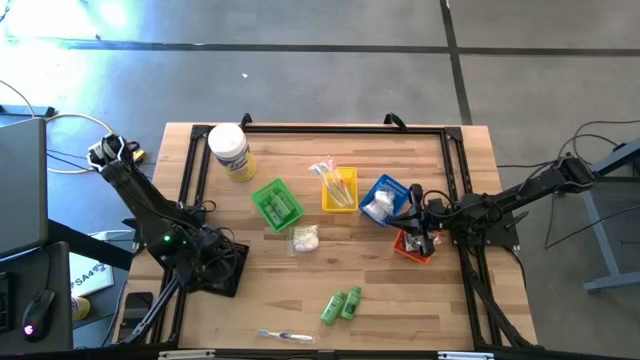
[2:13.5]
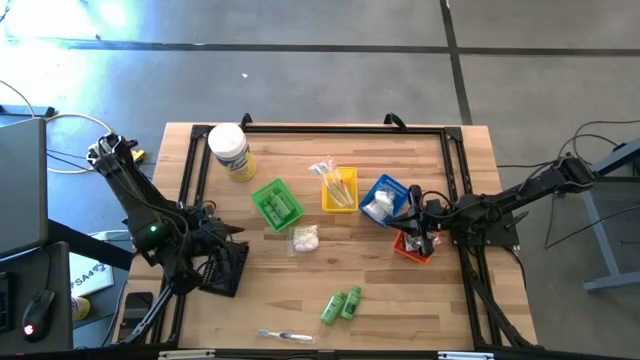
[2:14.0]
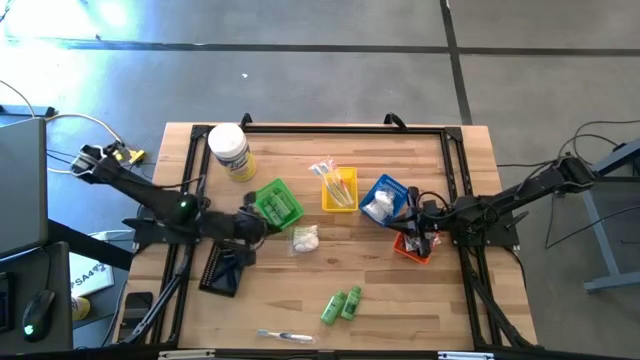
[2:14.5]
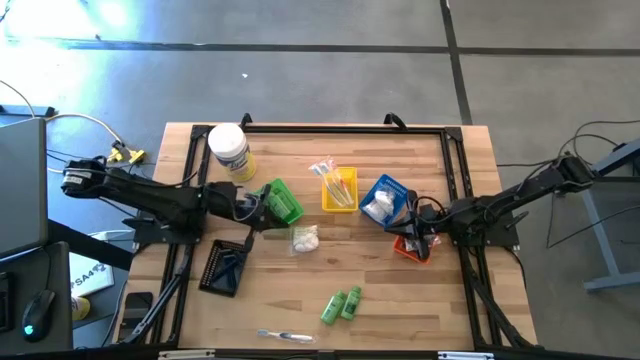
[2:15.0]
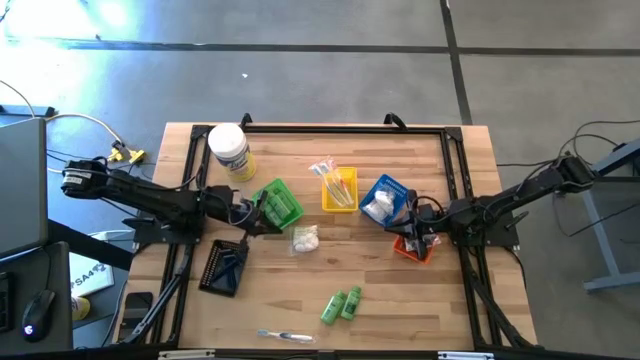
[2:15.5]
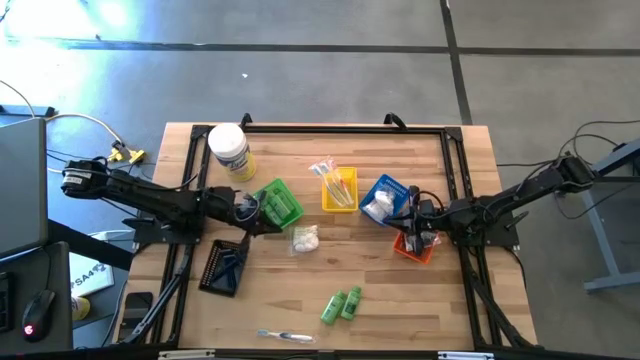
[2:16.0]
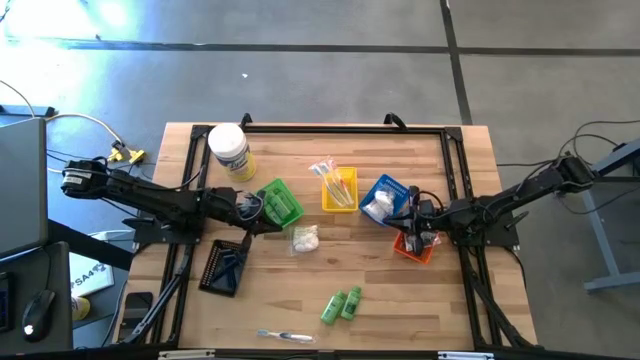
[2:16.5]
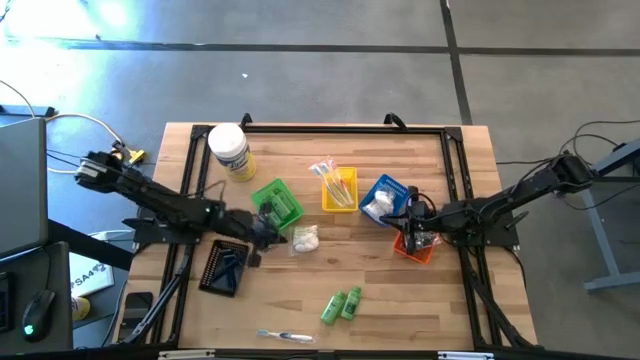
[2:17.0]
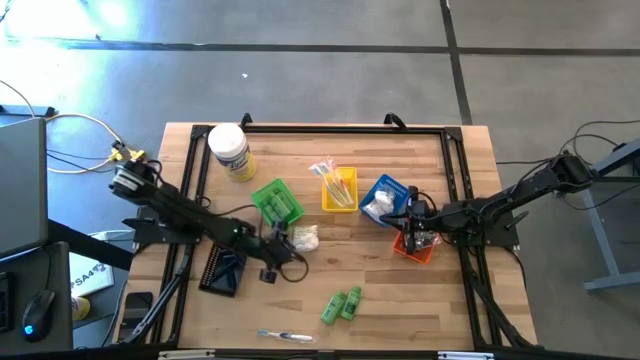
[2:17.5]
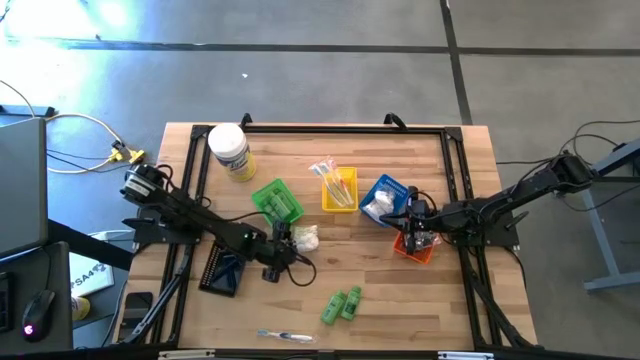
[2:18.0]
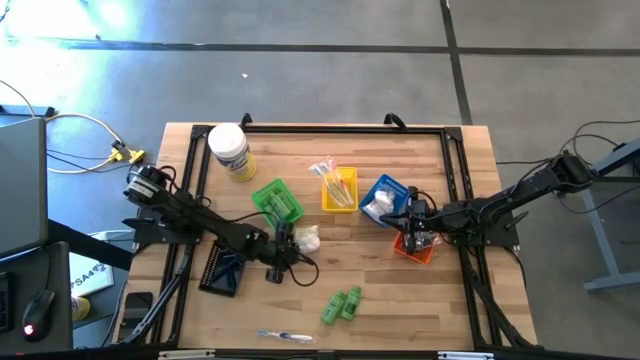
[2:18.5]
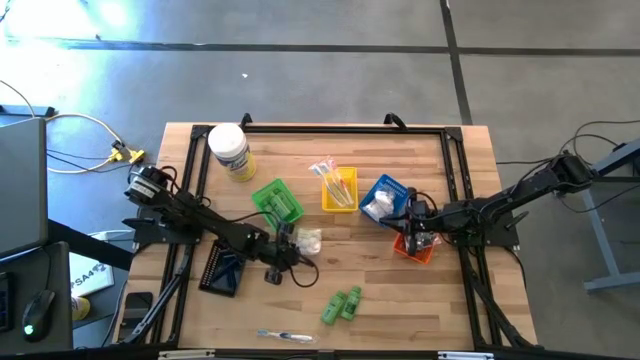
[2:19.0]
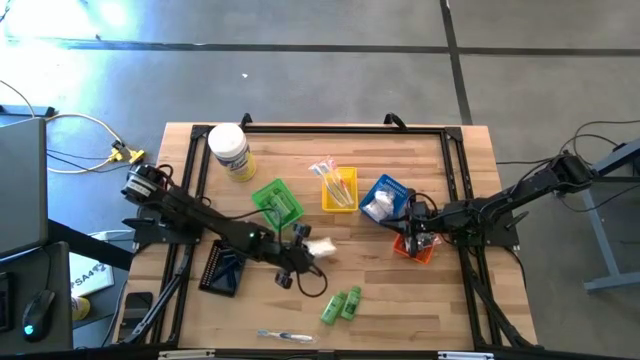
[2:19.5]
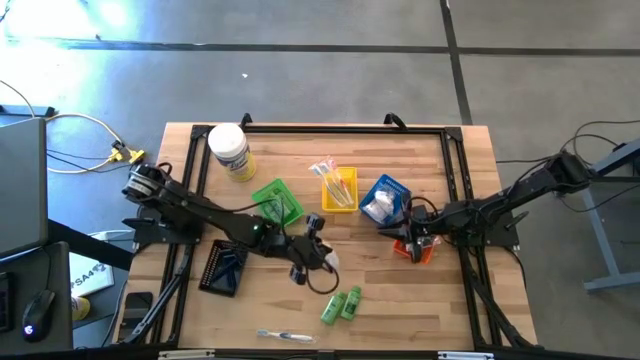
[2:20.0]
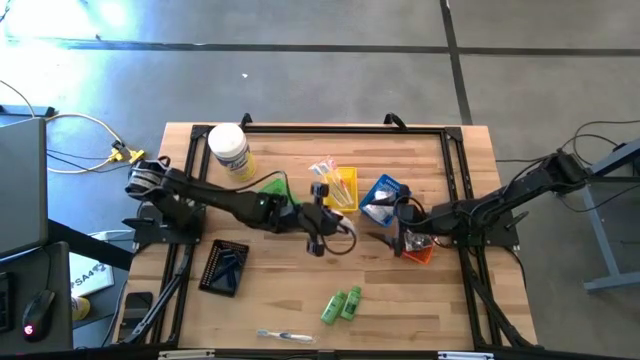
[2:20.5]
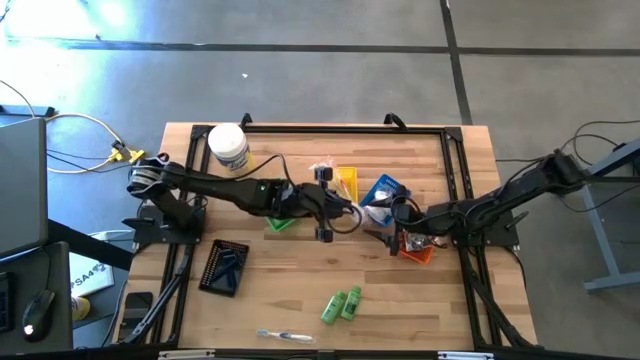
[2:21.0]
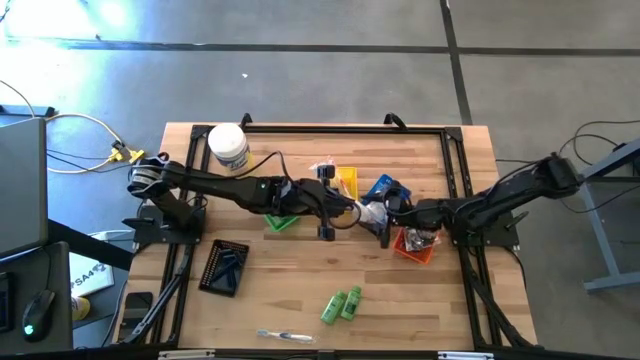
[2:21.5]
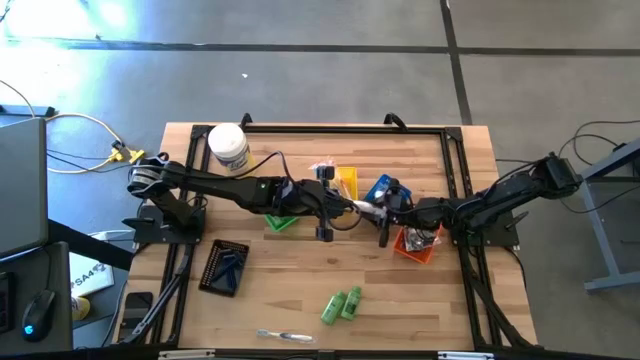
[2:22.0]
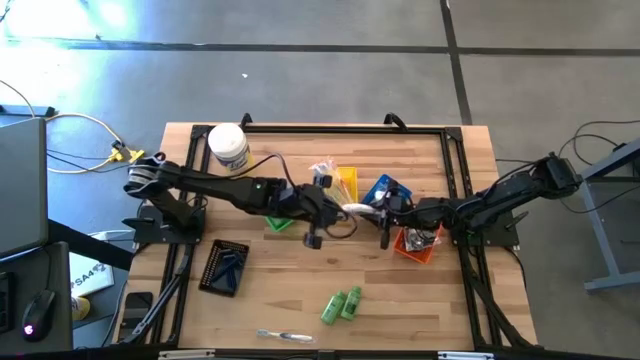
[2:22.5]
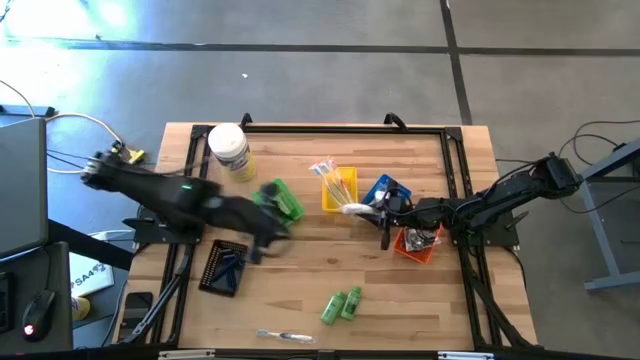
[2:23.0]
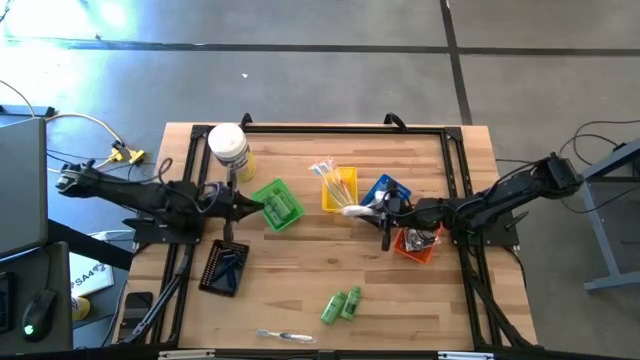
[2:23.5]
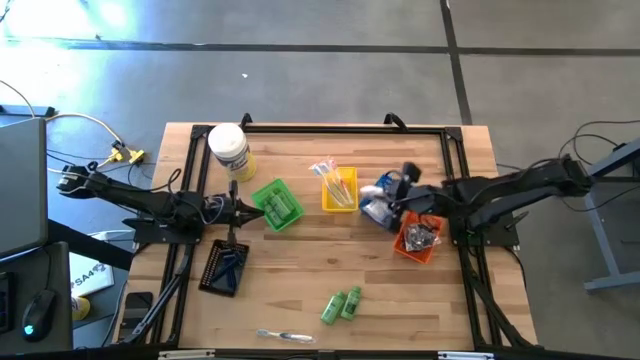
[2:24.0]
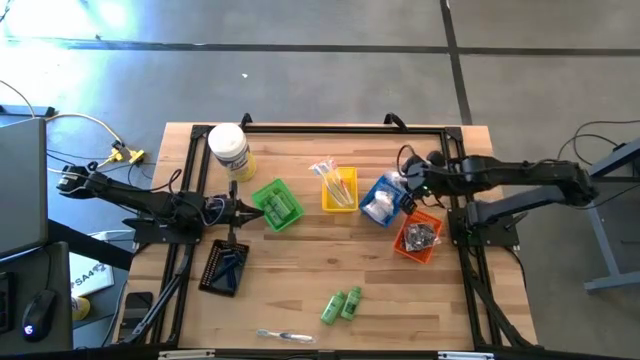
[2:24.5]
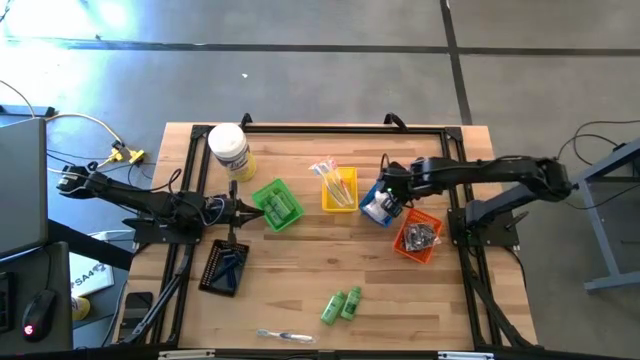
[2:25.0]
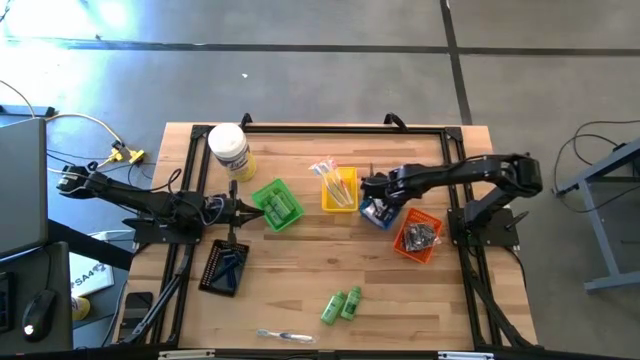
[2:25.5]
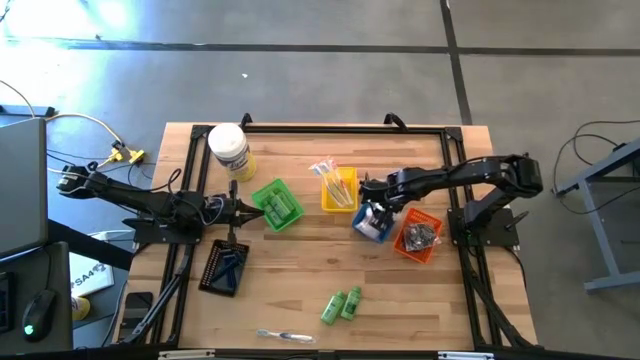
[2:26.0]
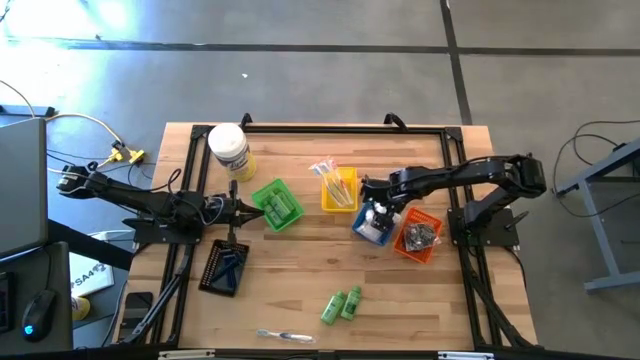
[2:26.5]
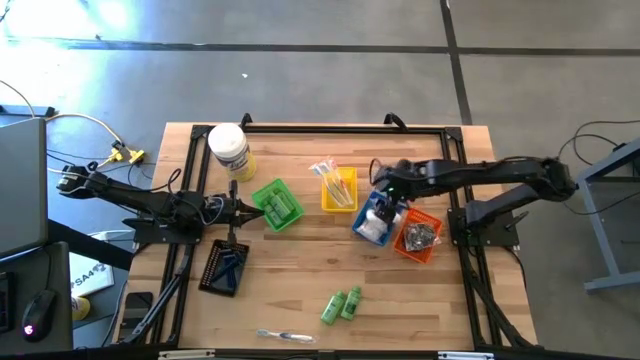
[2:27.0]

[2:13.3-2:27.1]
Task: Pick & Place Travel size toiletries
Put the cotton pack into the blue bin

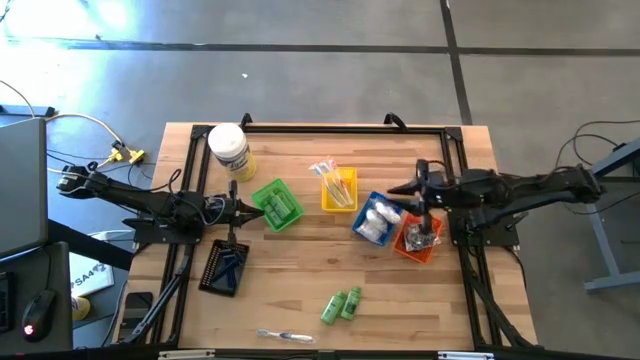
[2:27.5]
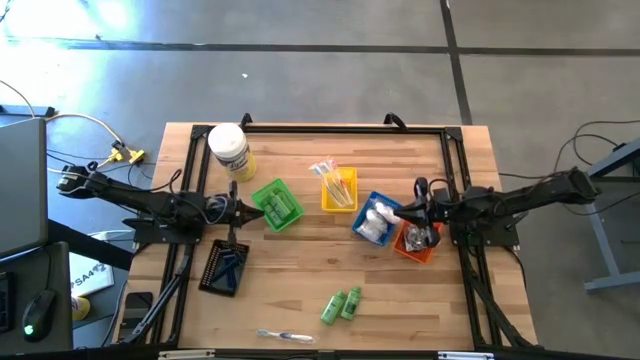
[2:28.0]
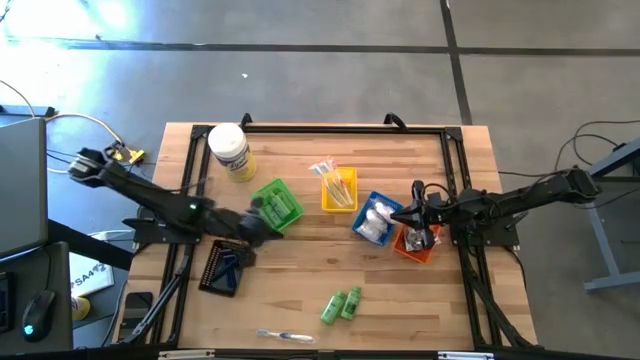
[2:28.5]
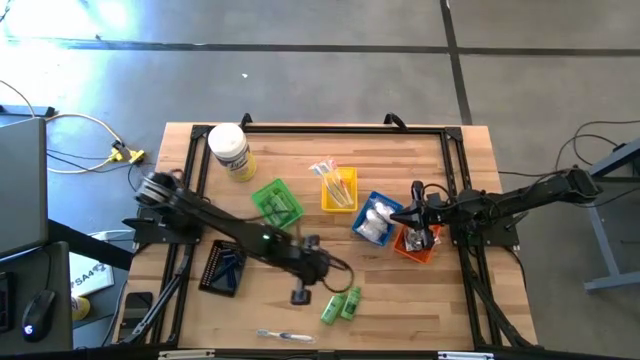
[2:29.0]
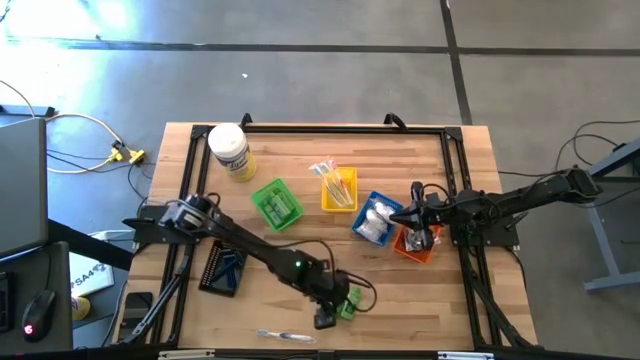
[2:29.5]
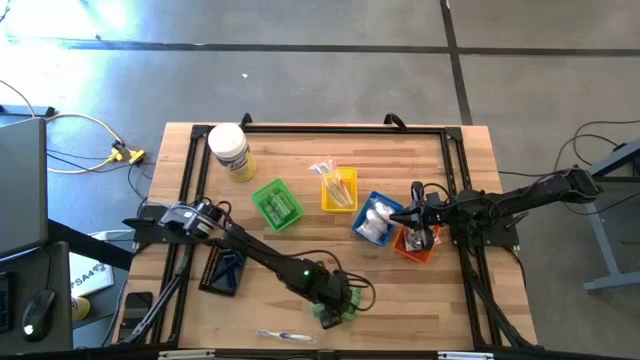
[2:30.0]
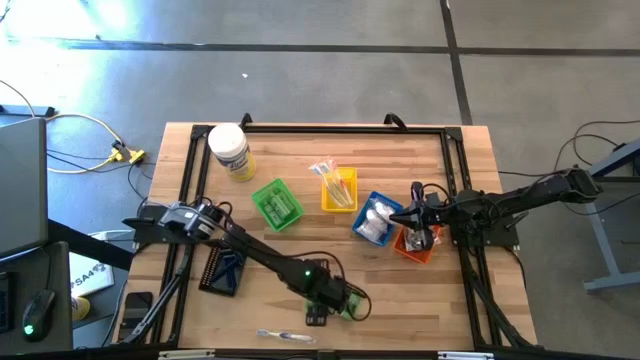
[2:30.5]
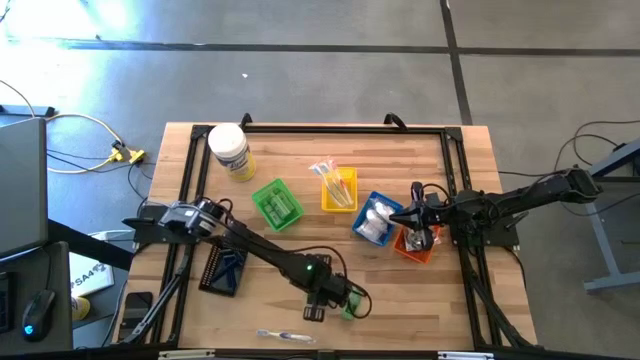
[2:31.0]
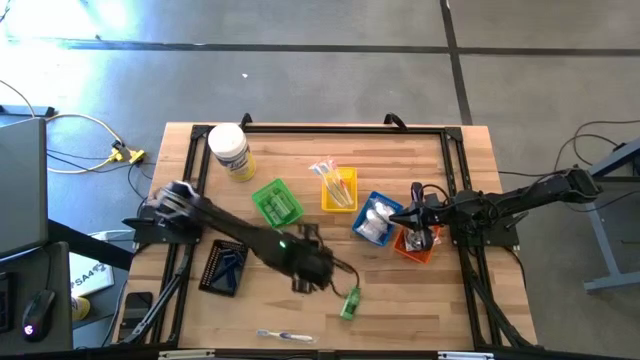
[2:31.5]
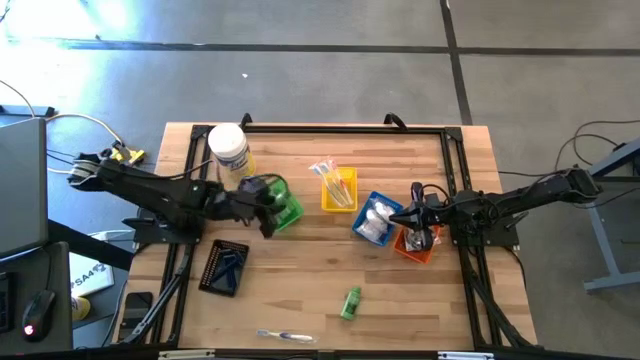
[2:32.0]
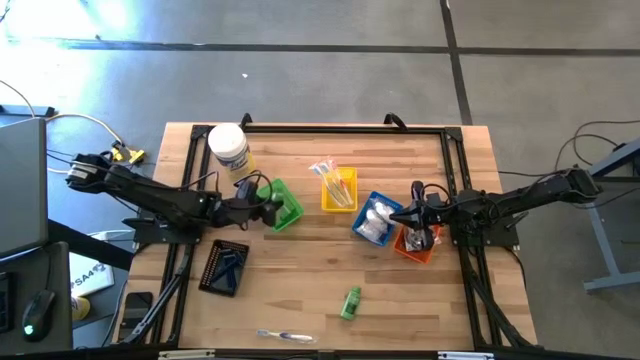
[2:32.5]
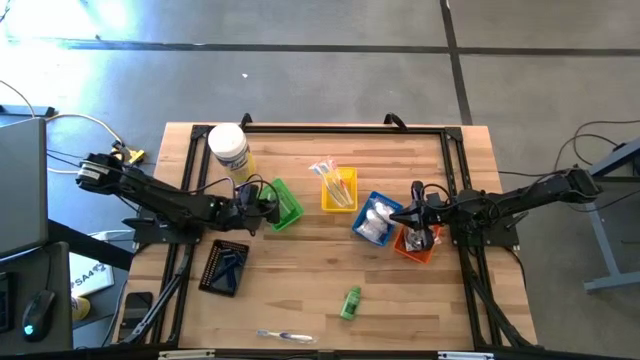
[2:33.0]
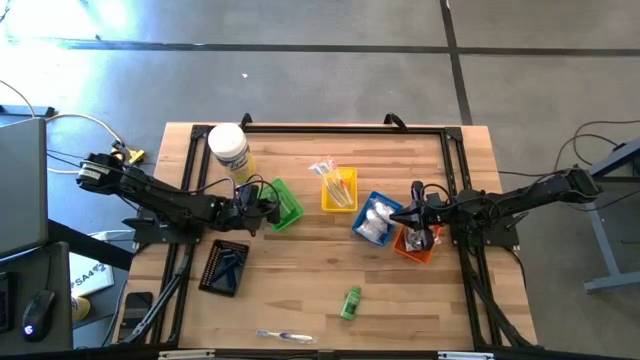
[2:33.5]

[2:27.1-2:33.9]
Put the left shampoo into the green bin

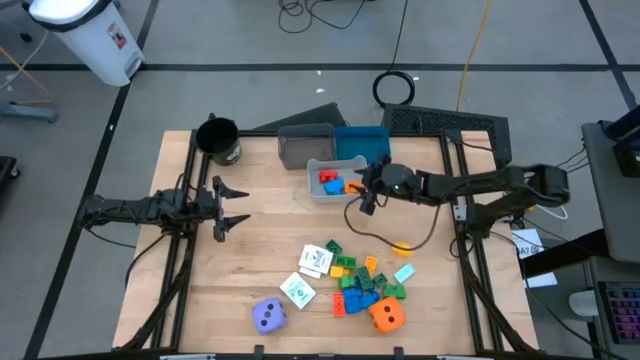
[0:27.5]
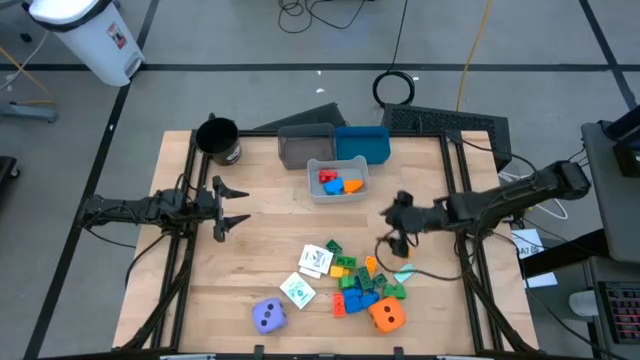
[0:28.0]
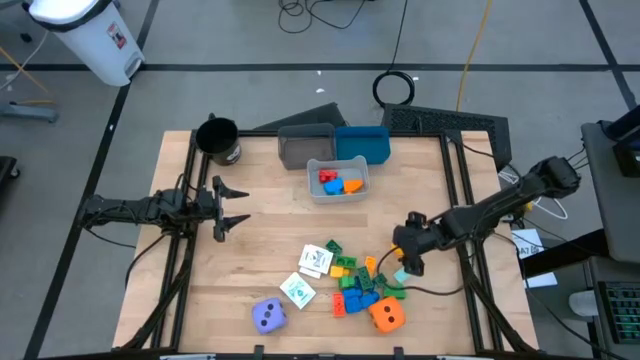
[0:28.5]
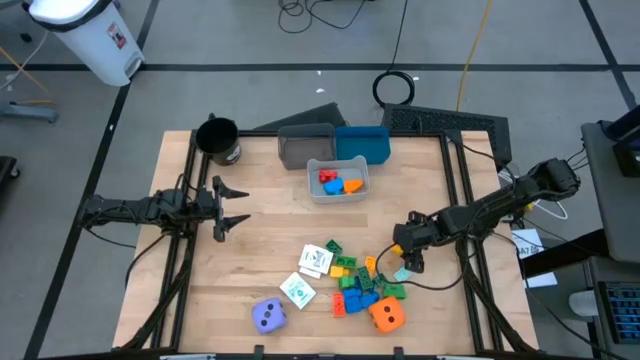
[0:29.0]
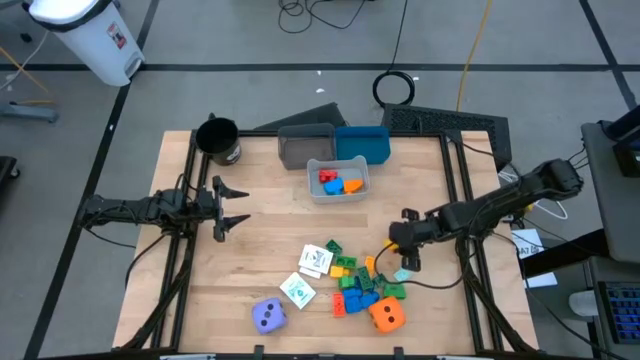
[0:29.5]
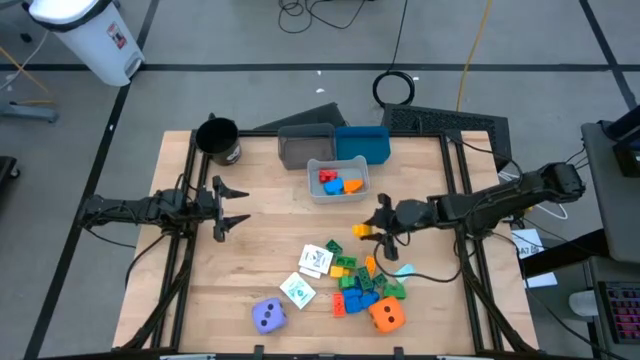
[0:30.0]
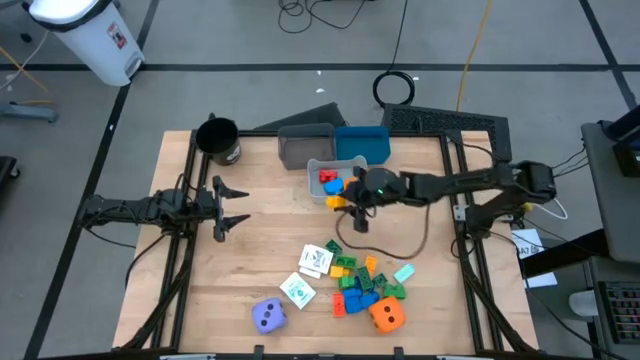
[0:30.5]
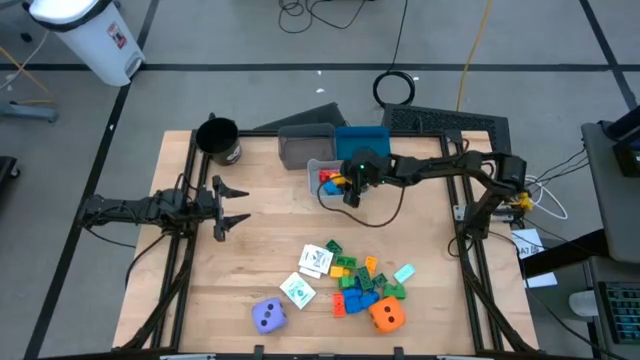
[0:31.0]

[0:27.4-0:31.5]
Task: Pick & Place Toys
Put the yellow game piece into the gray bin
